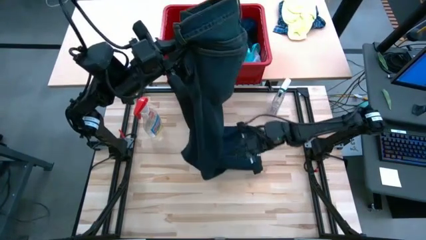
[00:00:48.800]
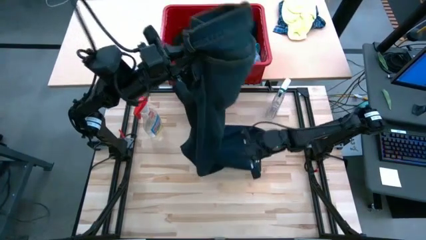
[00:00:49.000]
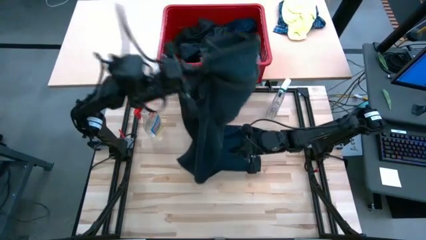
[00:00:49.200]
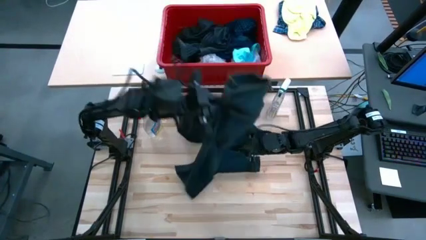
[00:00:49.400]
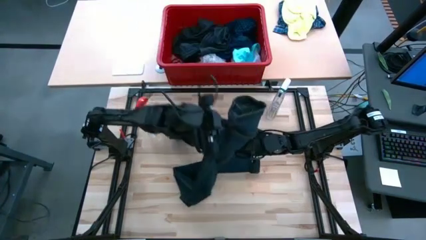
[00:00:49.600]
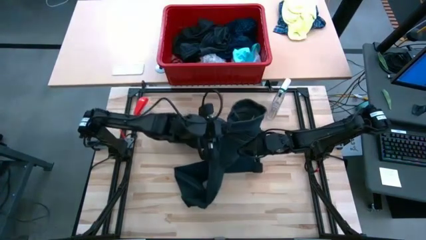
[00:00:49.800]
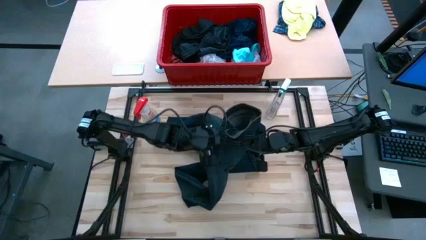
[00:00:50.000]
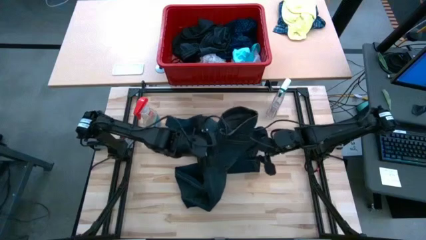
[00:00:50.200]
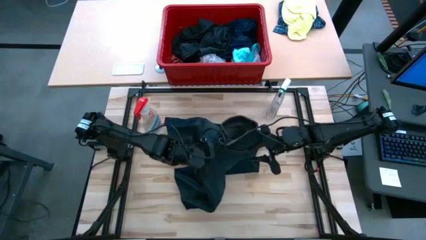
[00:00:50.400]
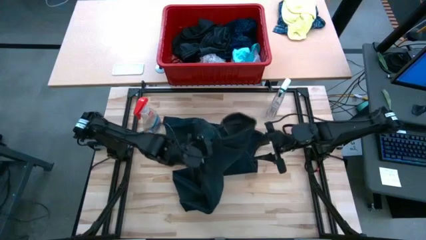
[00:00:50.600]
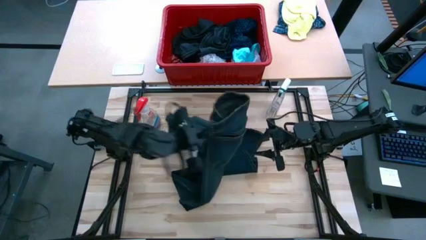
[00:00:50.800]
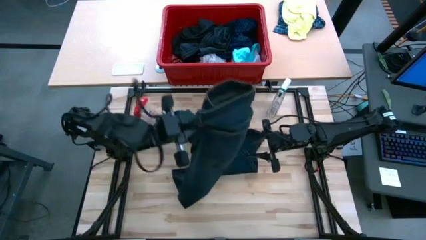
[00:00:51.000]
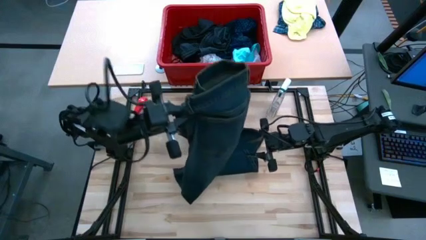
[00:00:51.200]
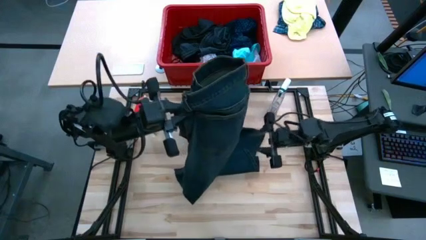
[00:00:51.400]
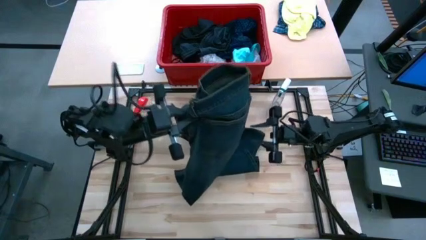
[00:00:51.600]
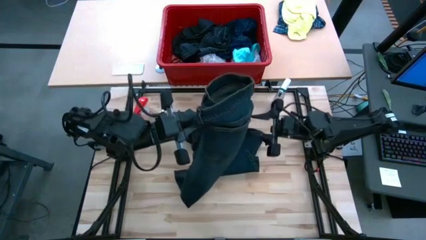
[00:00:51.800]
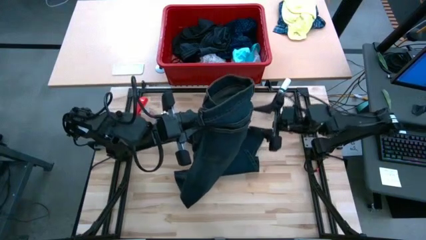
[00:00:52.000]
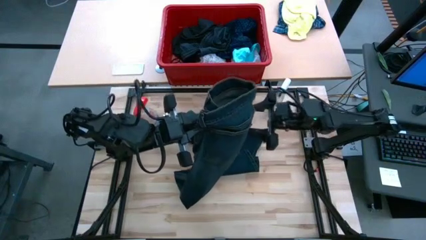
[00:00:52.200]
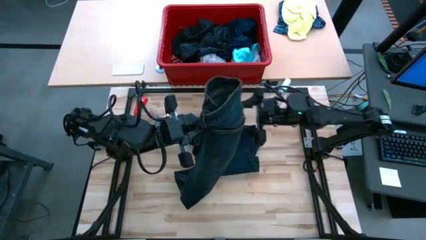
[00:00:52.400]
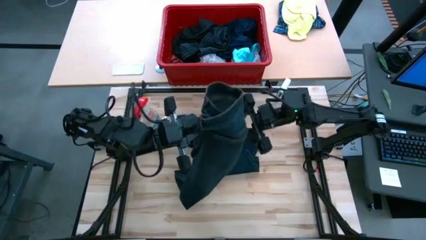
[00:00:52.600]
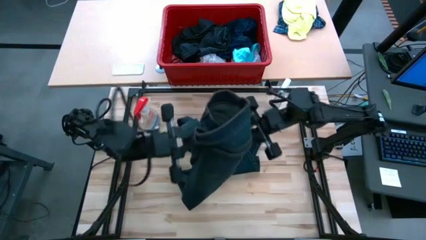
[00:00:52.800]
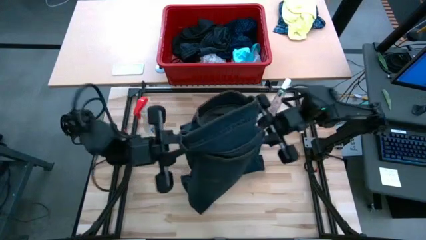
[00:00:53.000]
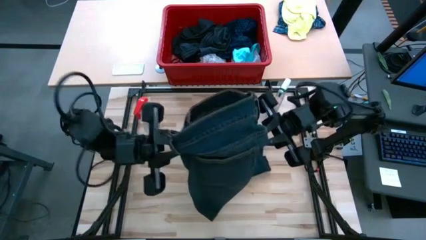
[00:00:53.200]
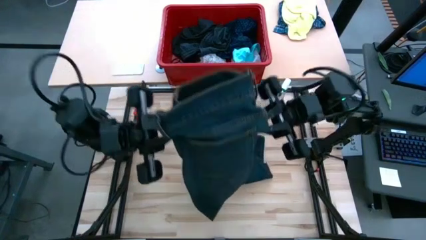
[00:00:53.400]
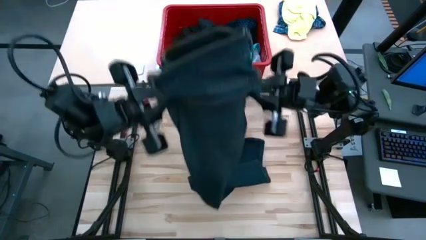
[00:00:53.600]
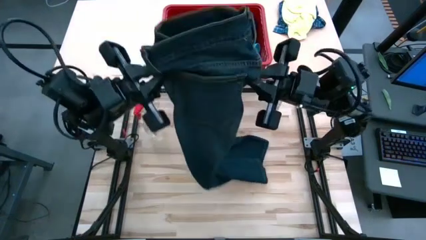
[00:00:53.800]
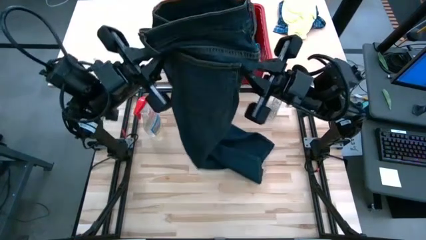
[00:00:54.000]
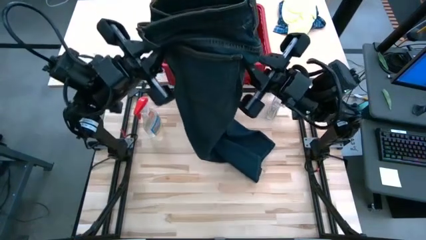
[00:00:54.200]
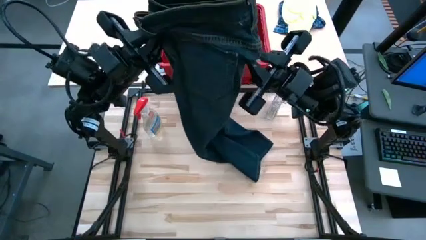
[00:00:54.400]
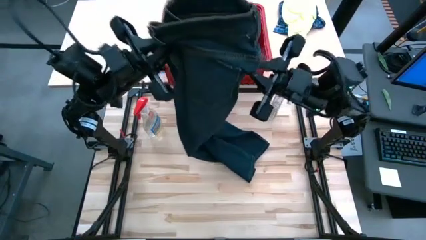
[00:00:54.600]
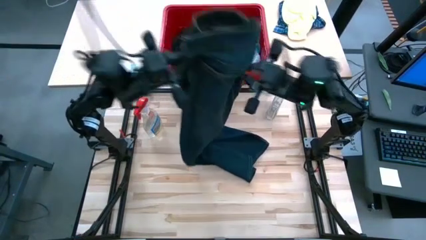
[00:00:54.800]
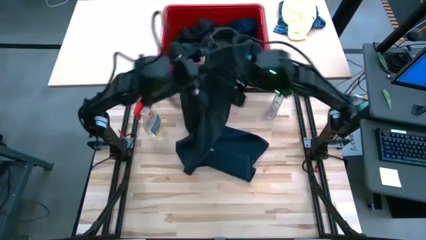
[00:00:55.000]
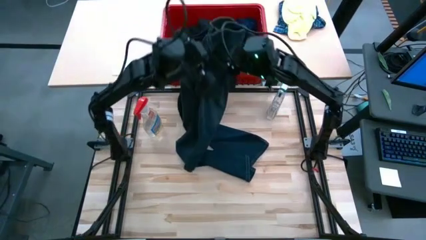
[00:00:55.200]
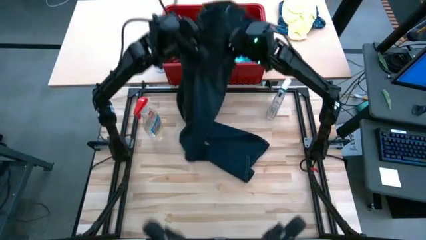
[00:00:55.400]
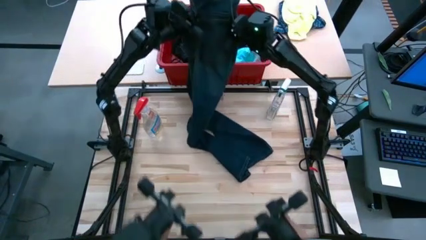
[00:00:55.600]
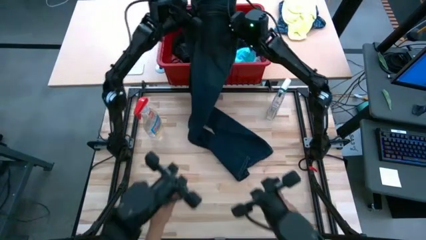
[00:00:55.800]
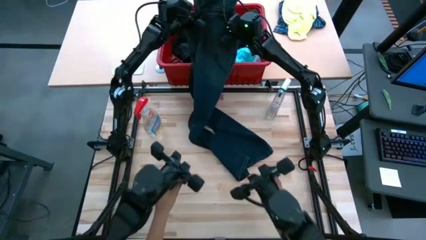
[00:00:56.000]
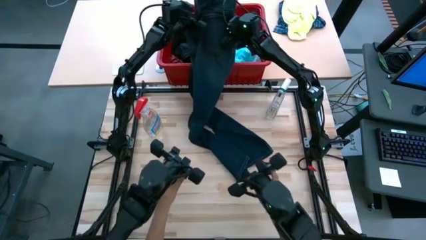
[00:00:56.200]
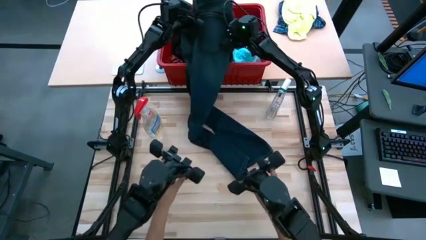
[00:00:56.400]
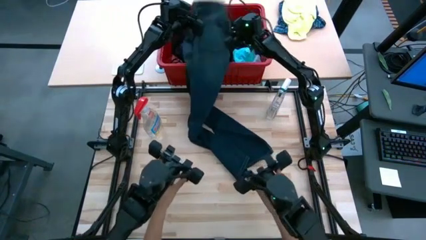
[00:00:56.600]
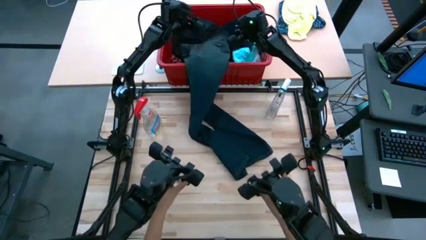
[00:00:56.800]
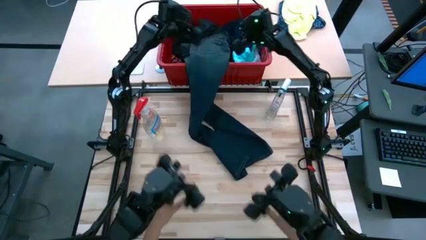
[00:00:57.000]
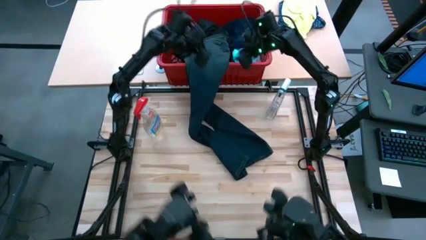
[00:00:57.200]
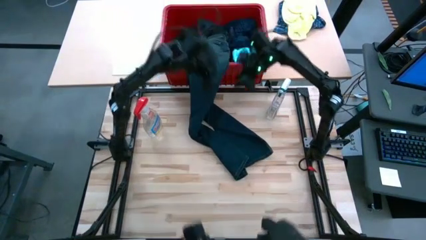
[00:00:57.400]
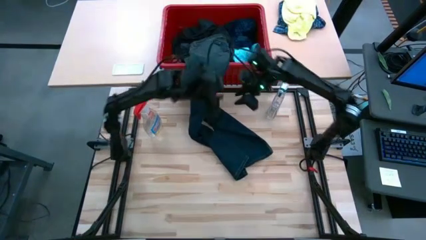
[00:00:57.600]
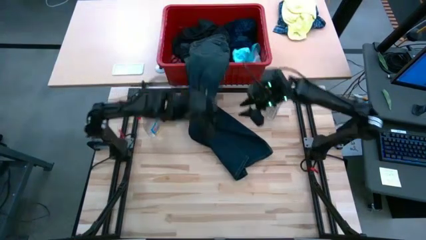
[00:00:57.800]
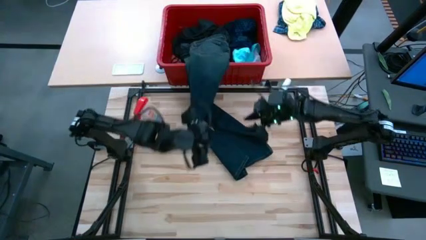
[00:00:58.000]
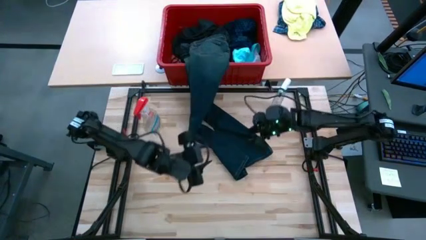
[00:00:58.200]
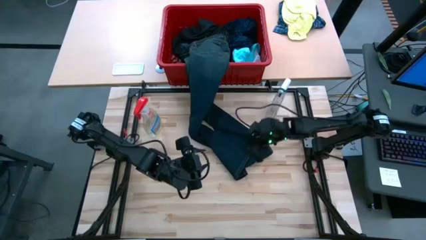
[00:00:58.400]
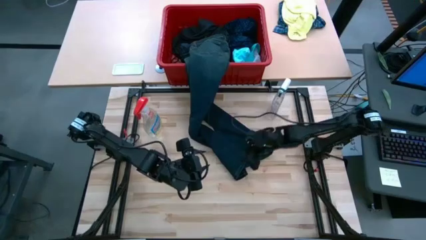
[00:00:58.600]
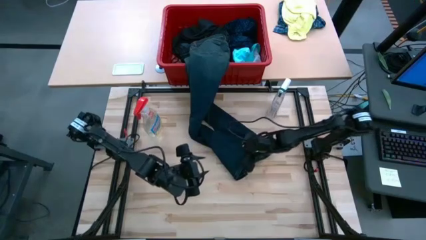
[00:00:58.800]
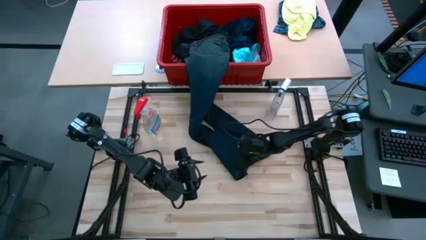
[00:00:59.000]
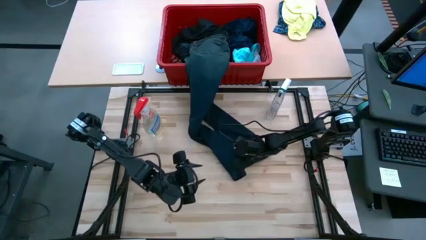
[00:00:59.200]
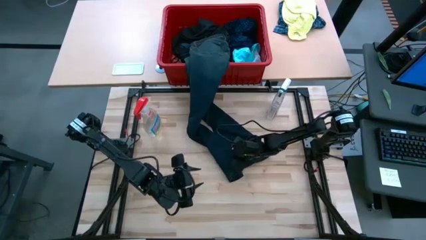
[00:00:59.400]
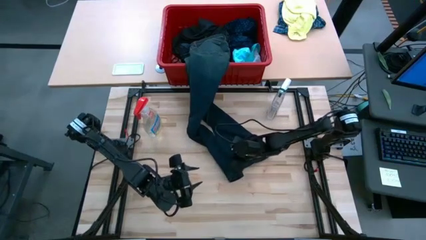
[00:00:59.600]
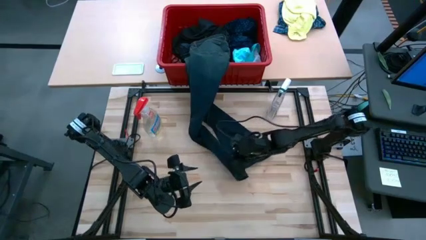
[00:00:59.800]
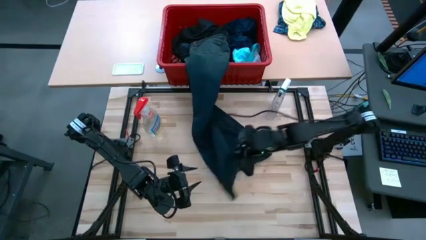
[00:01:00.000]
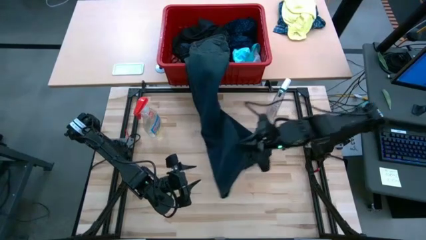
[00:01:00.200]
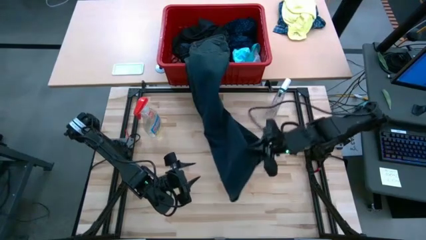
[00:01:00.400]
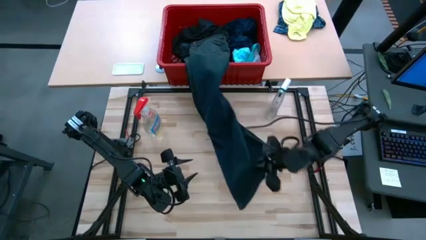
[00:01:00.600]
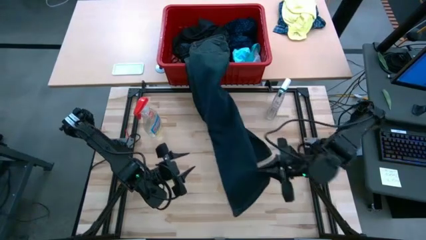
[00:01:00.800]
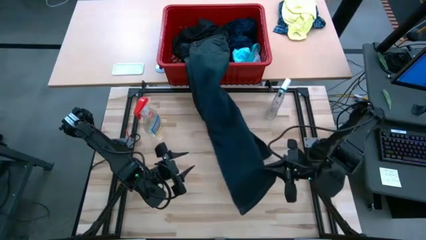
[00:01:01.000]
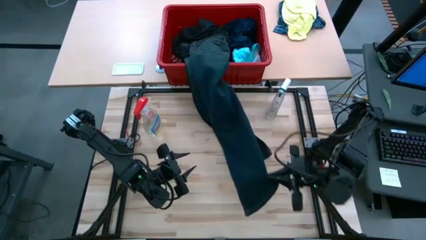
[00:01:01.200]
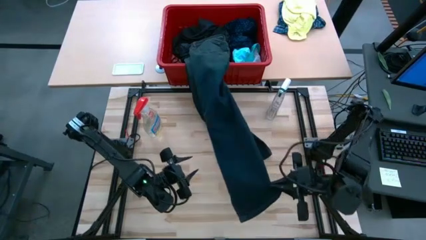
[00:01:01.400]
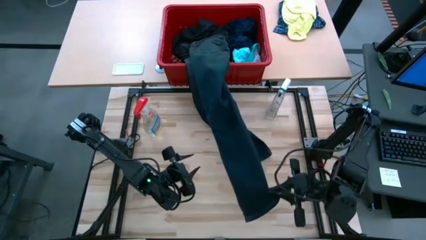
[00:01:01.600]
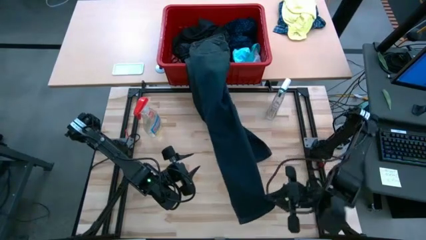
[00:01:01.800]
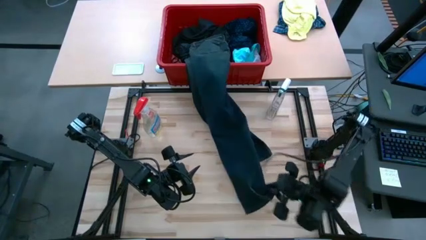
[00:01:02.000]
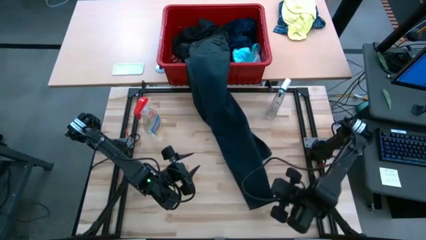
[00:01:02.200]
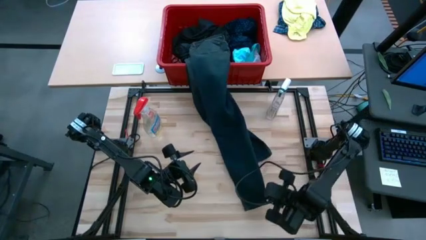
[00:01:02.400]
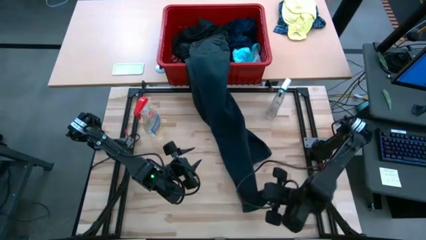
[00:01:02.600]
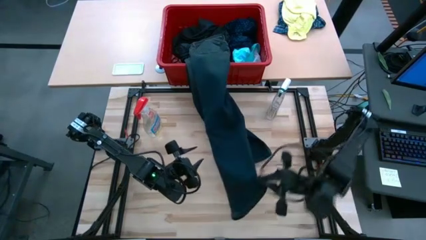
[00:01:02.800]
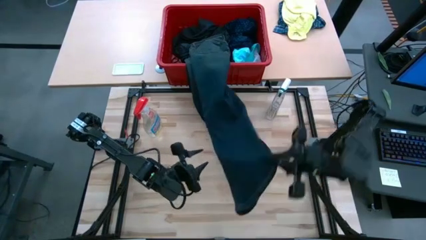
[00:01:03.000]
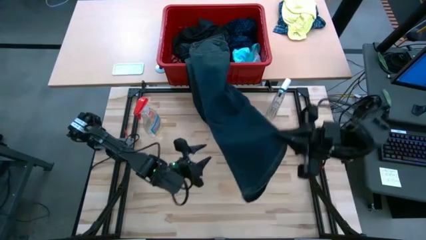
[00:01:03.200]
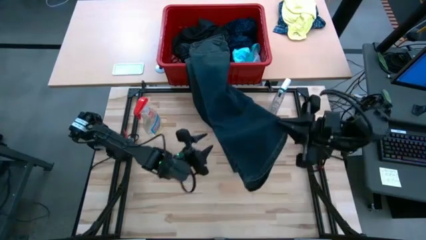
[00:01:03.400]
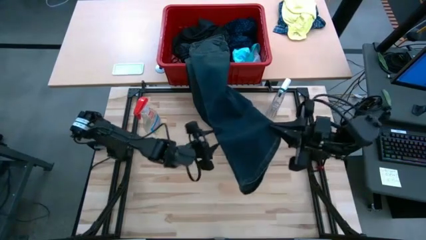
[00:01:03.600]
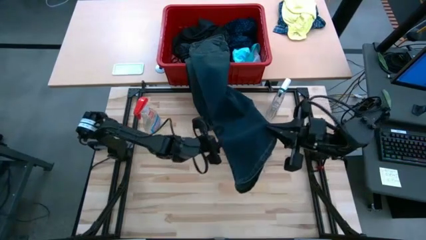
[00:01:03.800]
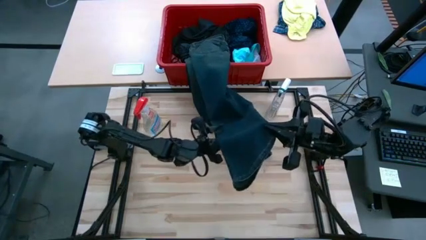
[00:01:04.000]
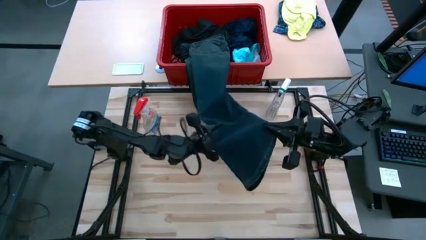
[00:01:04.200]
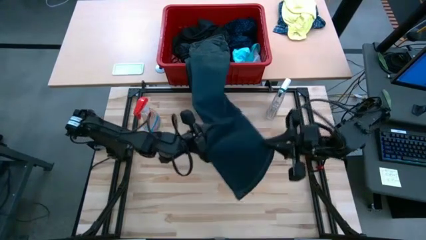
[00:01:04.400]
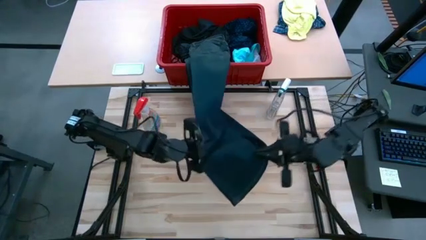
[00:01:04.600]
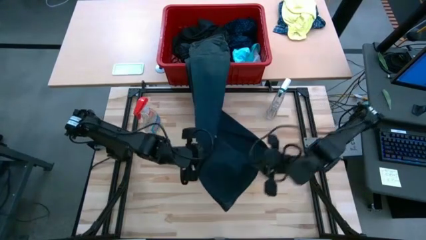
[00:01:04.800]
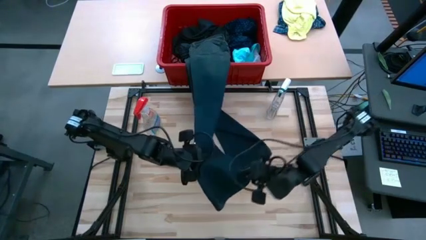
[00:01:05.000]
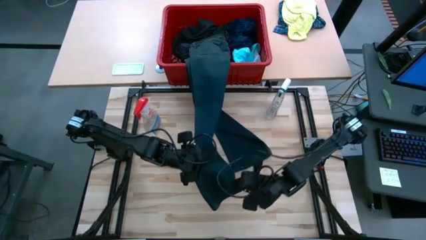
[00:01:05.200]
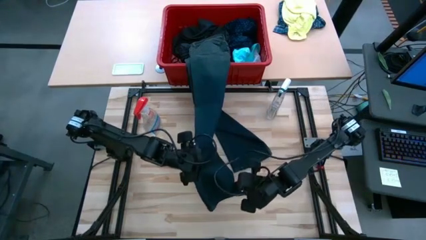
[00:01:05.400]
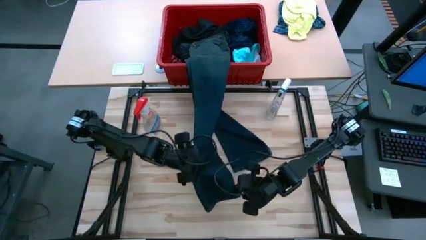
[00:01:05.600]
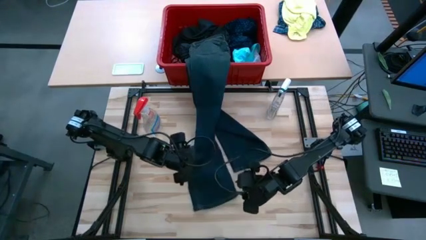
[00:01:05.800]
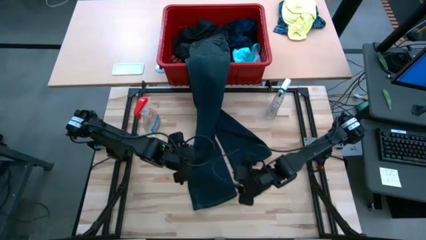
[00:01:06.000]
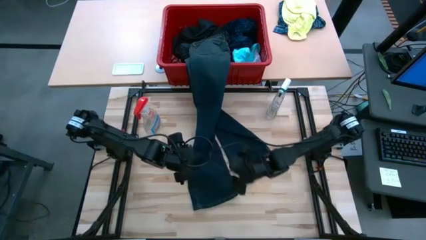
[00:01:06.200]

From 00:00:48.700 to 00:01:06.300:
Task: Fold Laundry from Bin
Fold the blue pants
